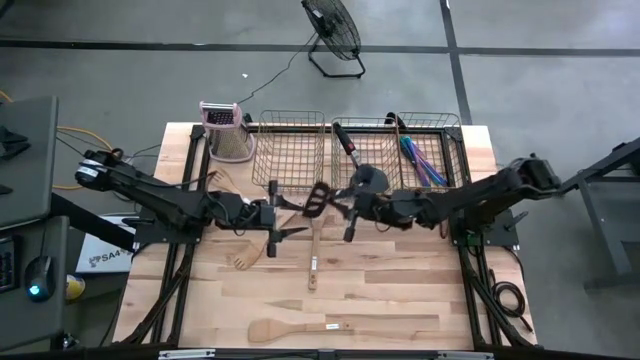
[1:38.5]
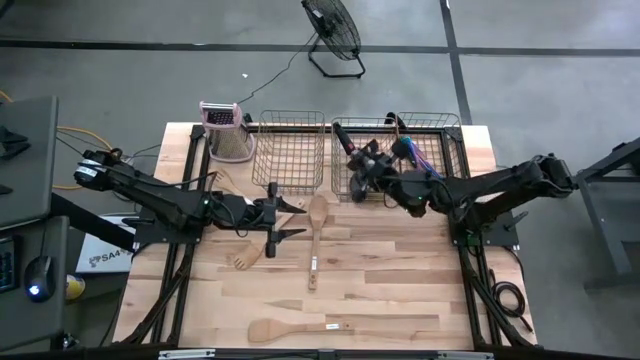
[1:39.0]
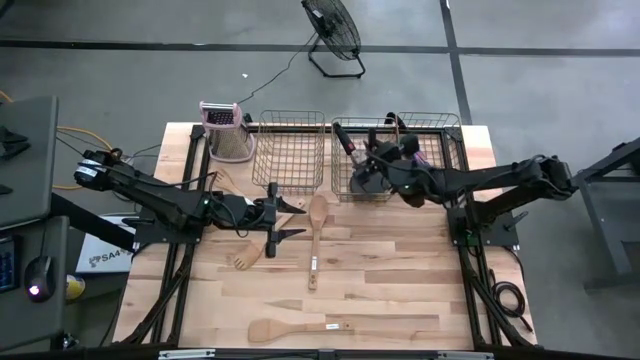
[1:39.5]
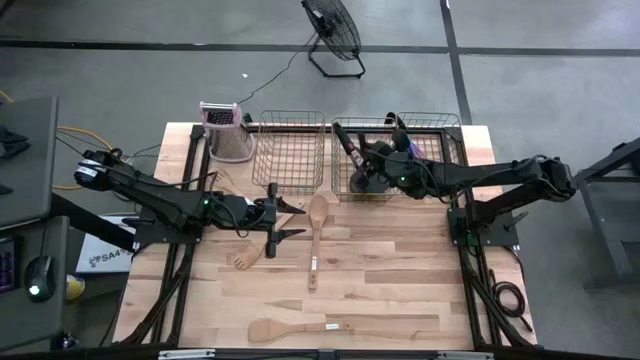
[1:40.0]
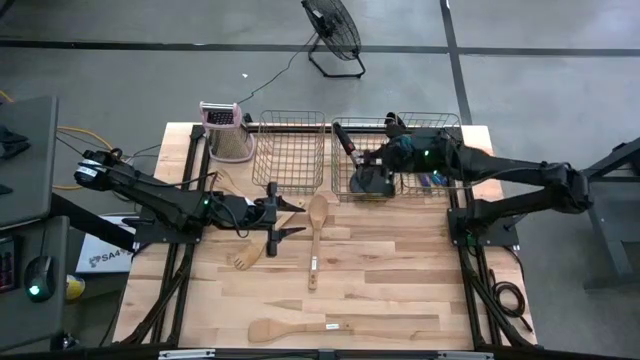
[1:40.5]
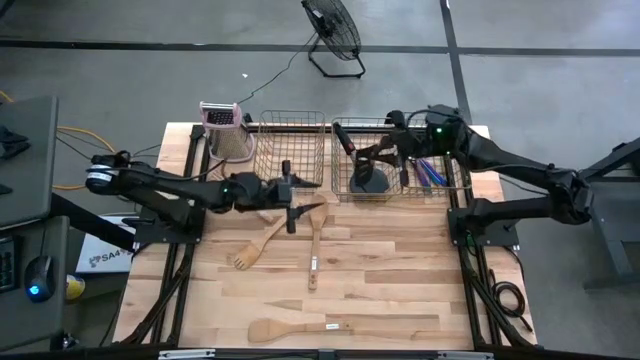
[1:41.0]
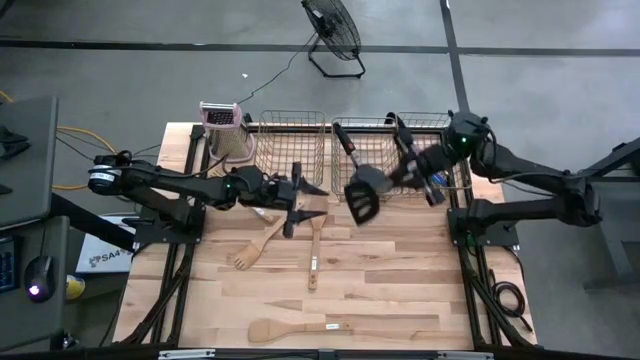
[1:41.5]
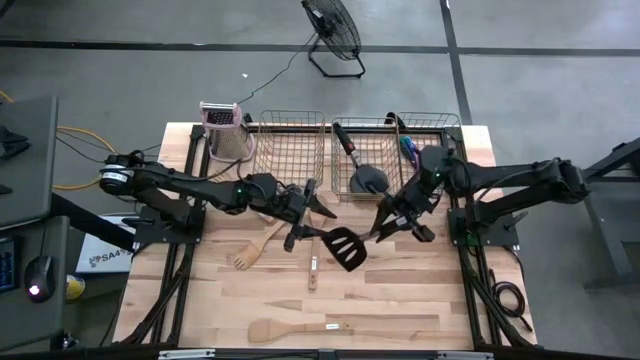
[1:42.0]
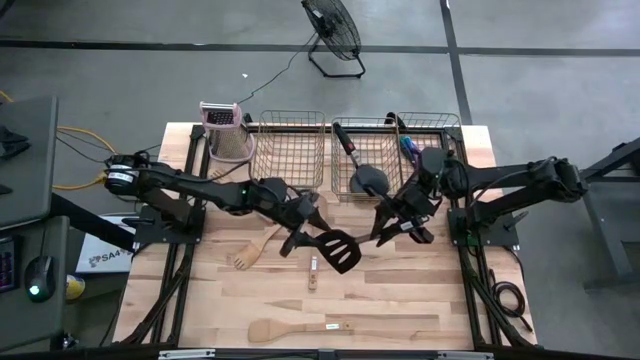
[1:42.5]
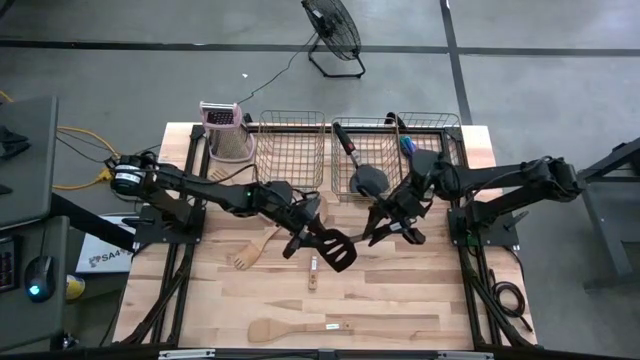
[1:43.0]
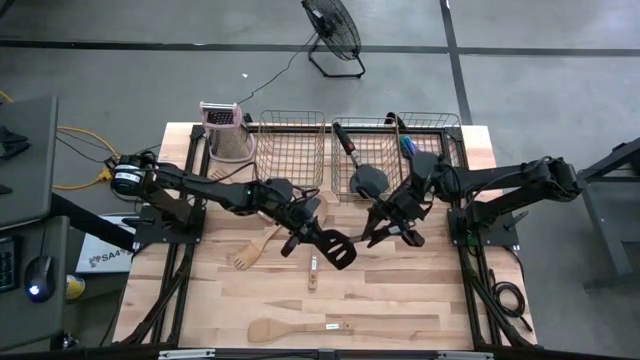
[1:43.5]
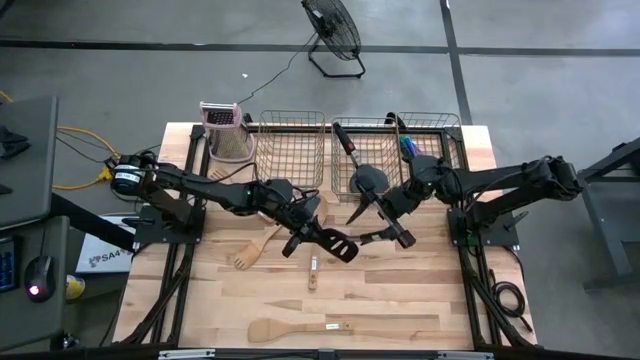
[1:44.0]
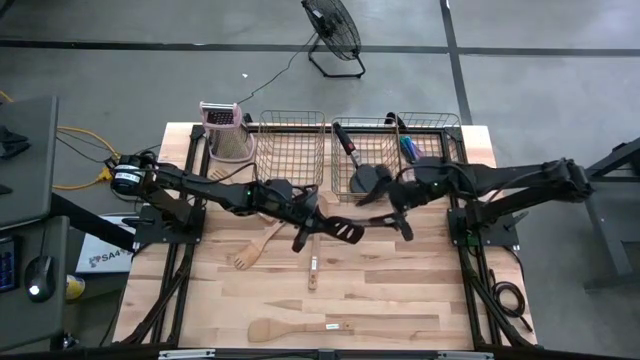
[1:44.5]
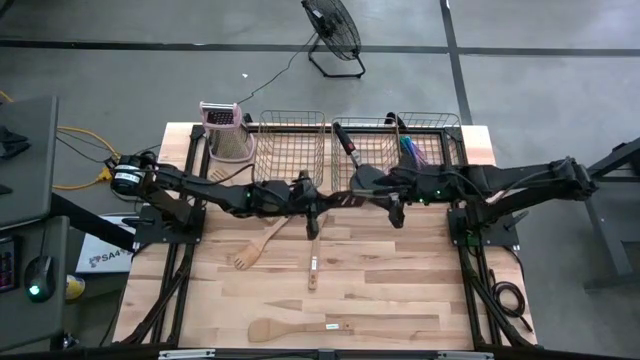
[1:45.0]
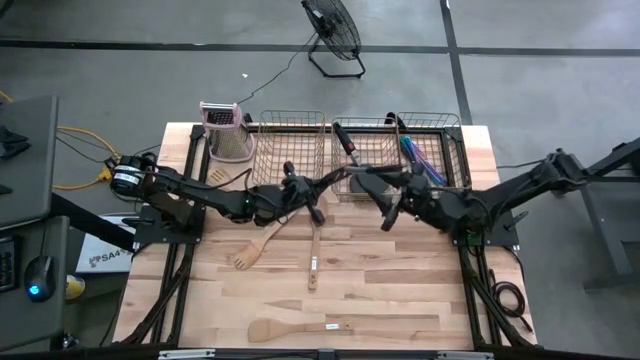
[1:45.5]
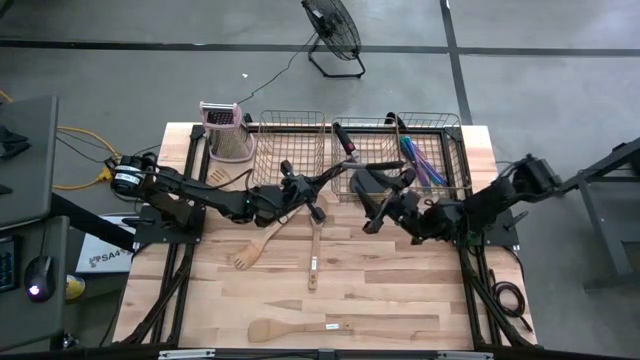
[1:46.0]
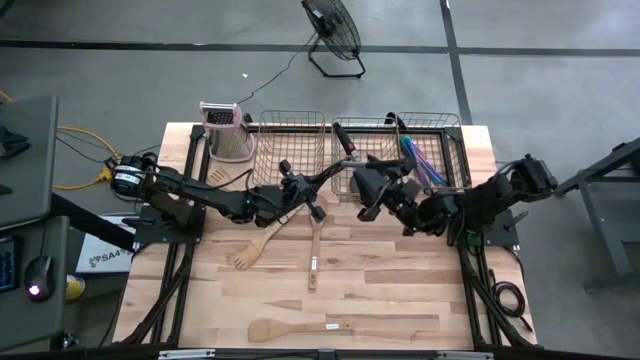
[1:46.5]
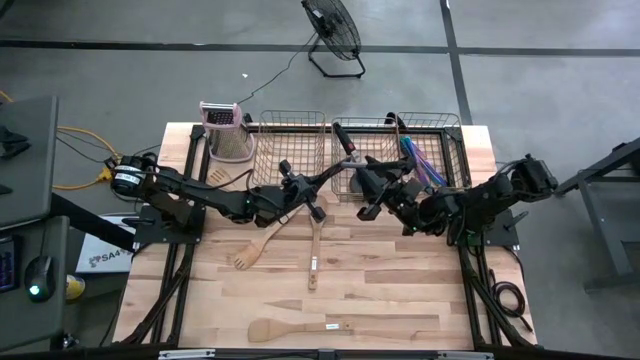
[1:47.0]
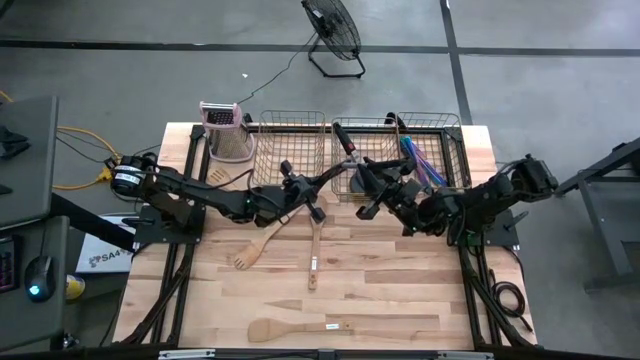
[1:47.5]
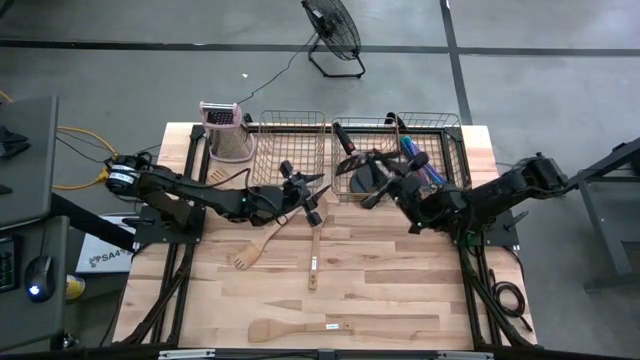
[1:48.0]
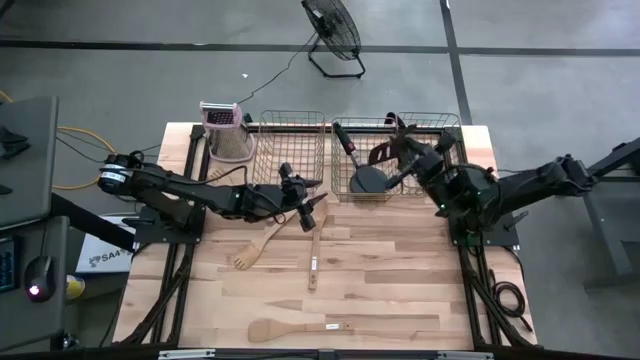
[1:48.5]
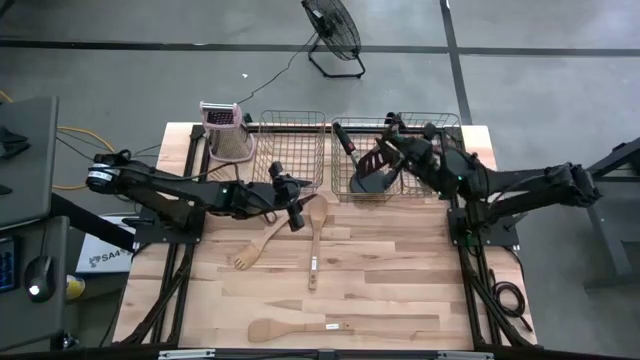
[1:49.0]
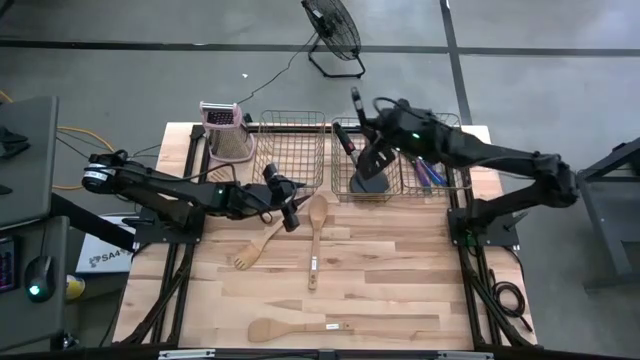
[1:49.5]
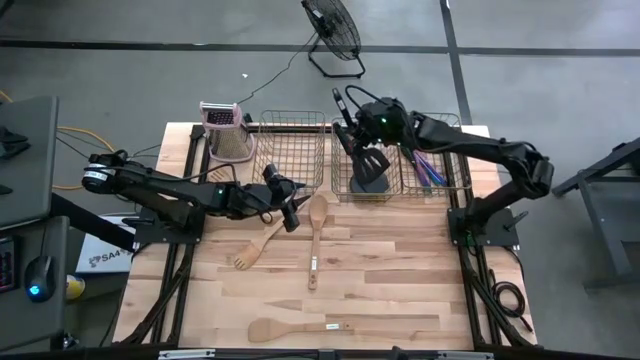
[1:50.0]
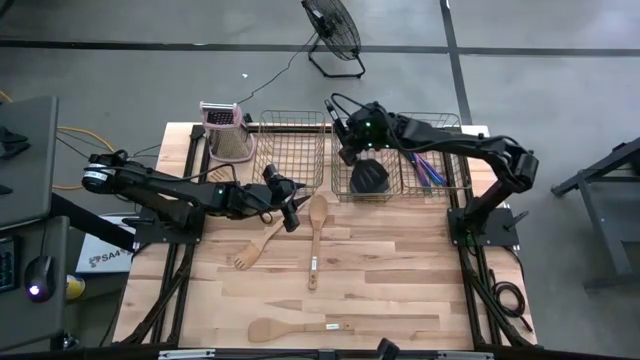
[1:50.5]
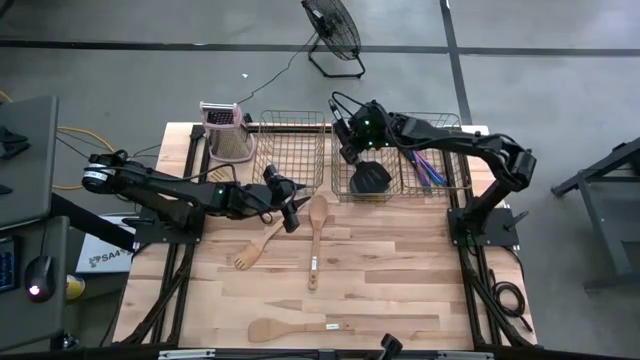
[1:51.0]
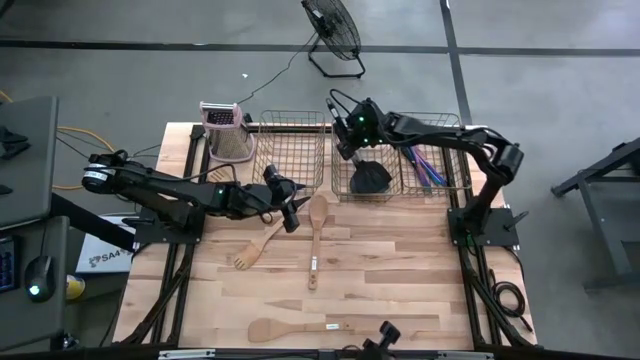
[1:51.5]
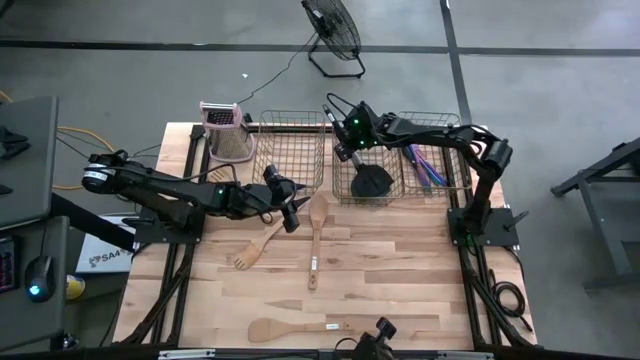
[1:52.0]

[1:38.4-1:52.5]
Task: Pick & Place Kitchen Items
Put the black slotted turner spatula into the middle mesh basket

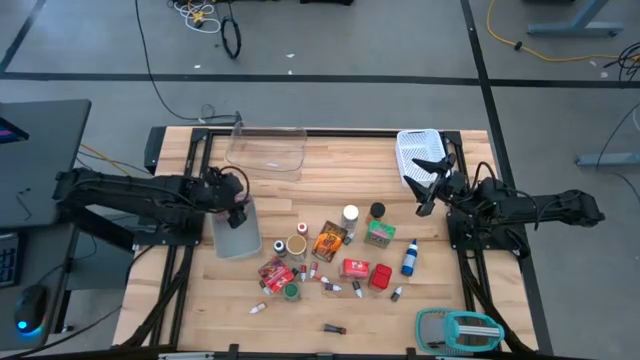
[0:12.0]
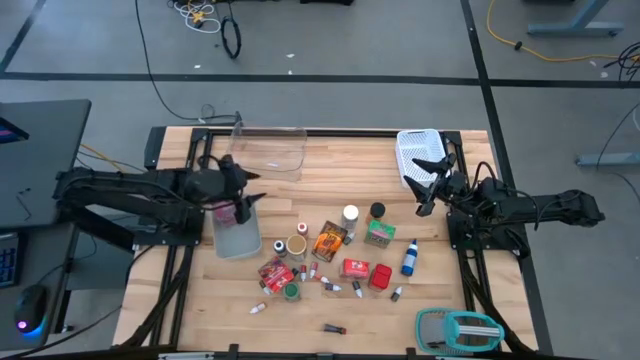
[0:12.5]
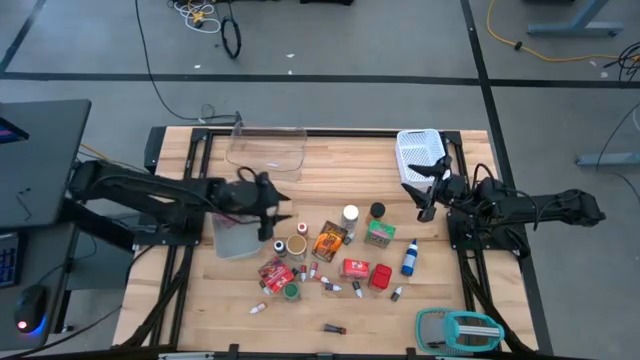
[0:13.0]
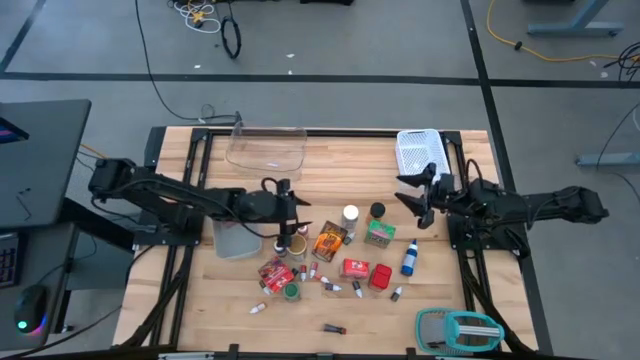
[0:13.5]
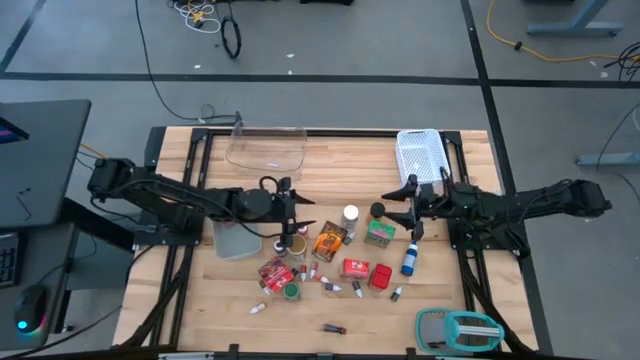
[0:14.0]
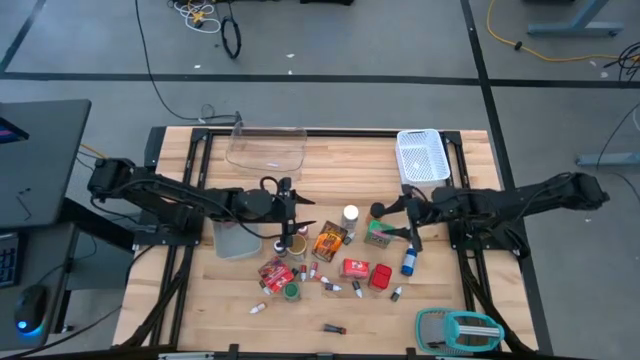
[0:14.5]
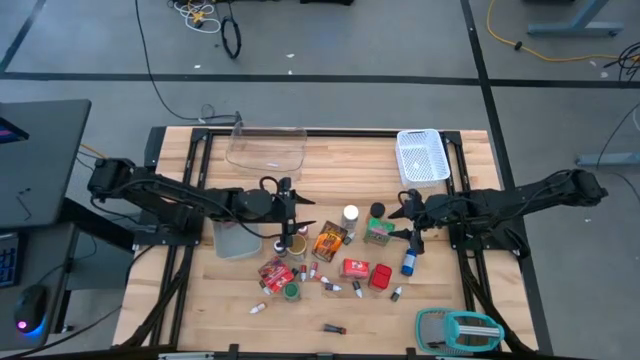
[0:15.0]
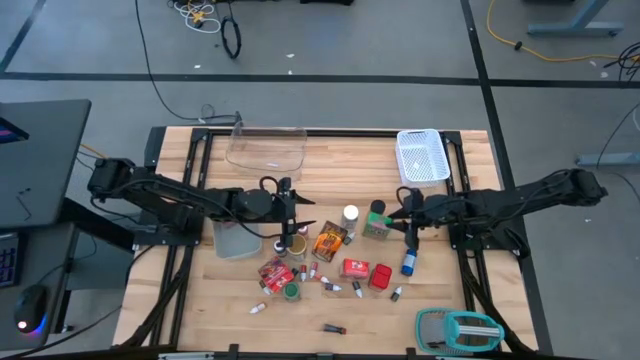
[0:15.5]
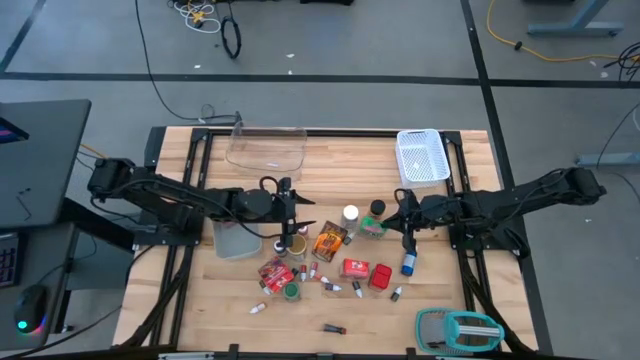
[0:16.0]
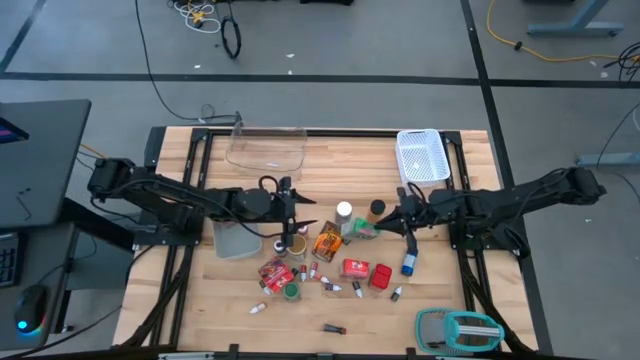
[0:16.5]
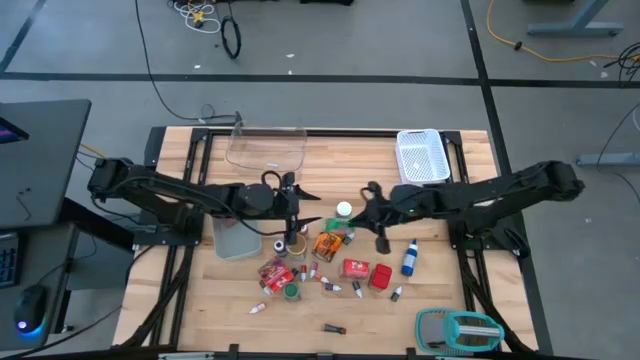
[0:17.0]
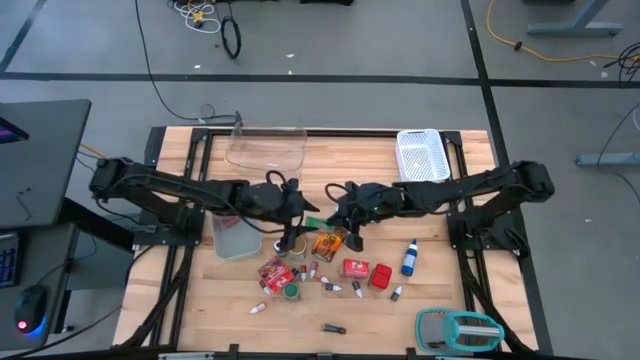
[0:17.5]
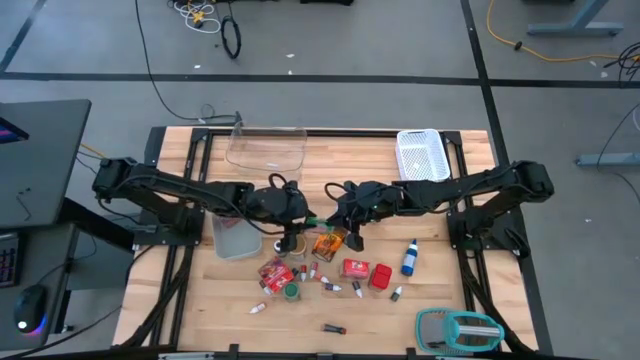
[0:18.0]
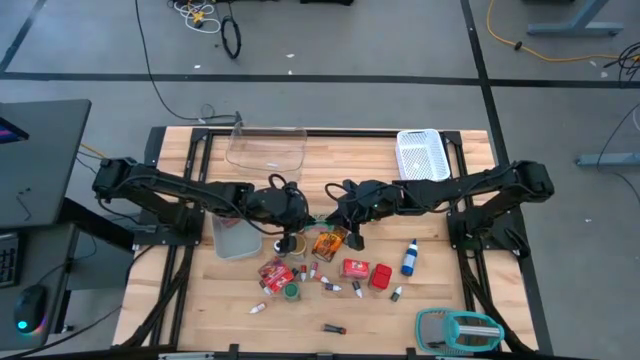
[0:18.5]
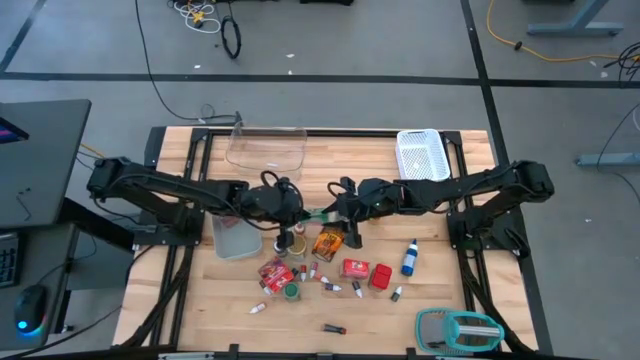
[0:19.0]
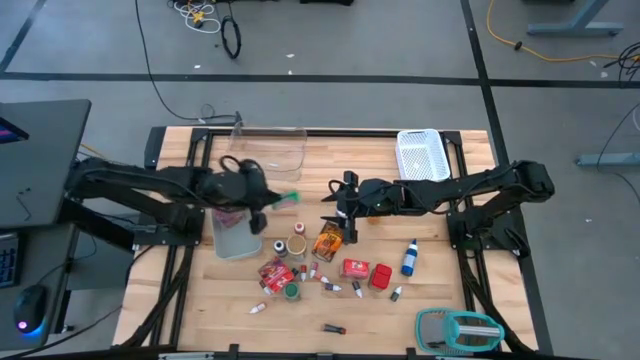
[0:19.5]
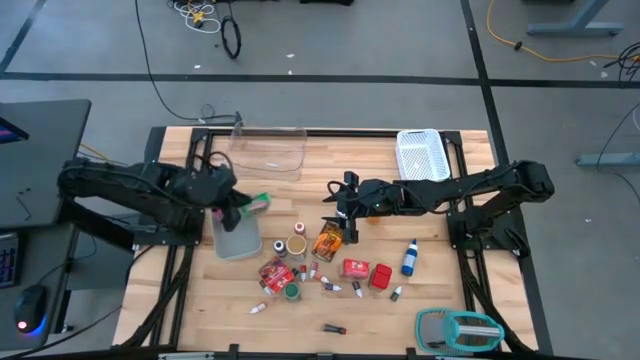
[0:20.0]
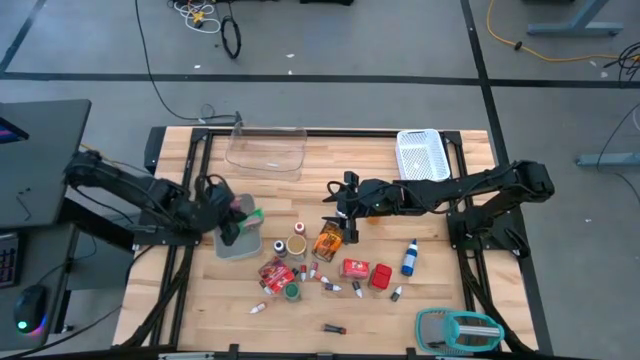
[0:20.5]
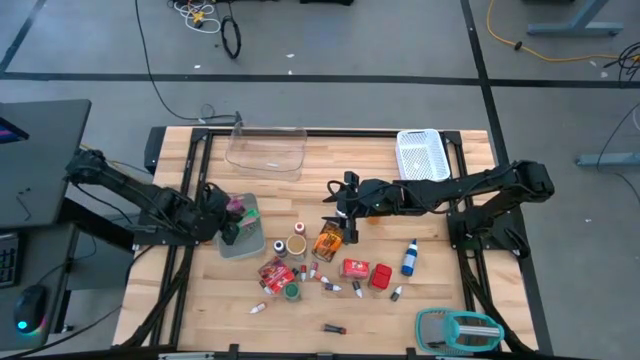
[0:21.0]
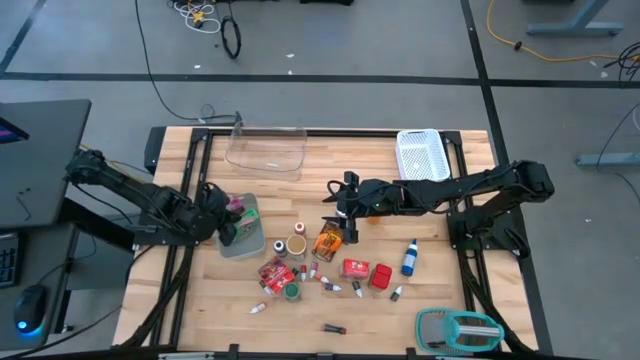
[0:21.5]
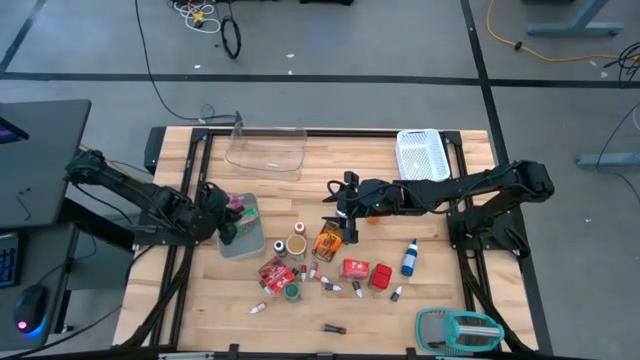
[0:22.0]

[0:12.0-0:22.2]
Task: Pick & Place Kitchen Items
Put the green cereal box into the gray bin
